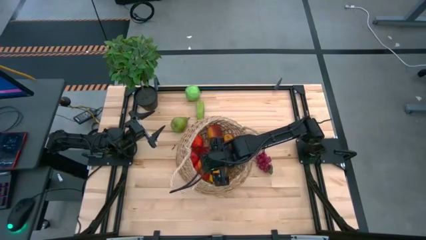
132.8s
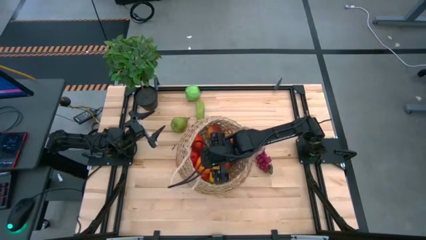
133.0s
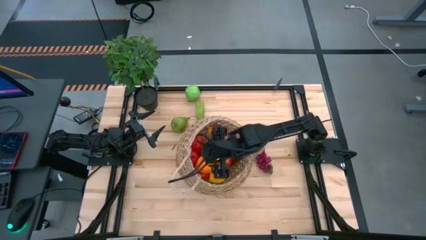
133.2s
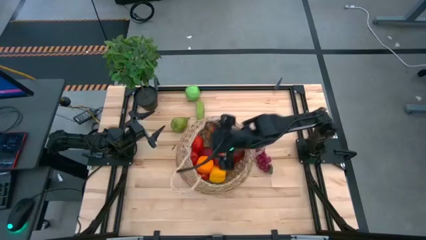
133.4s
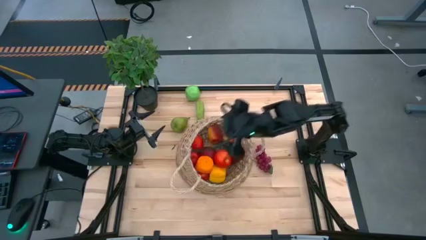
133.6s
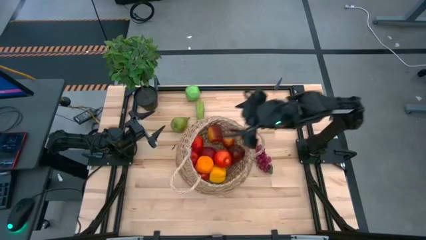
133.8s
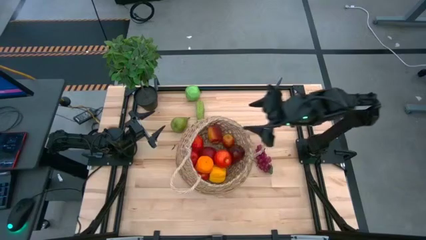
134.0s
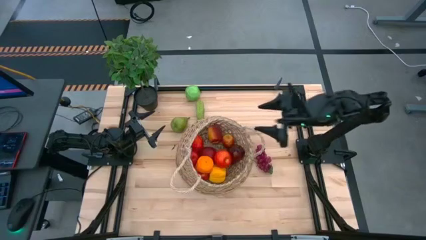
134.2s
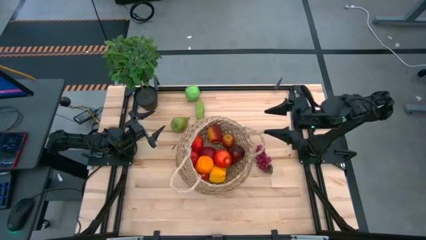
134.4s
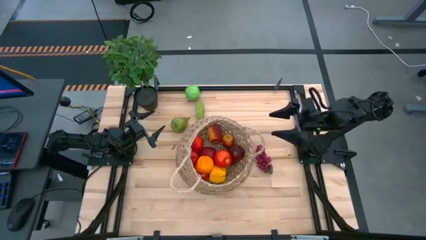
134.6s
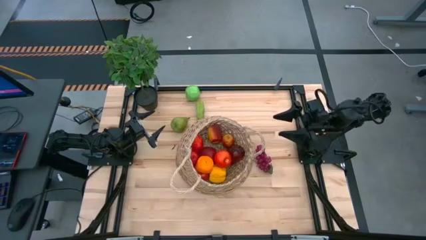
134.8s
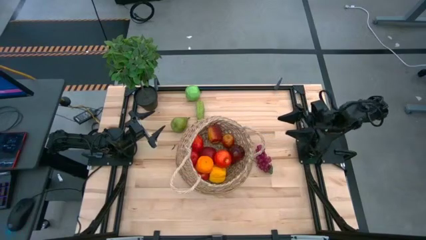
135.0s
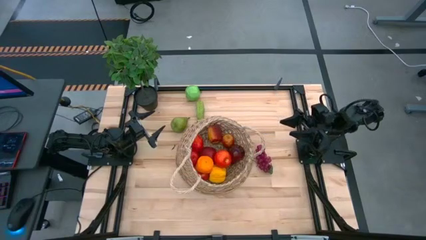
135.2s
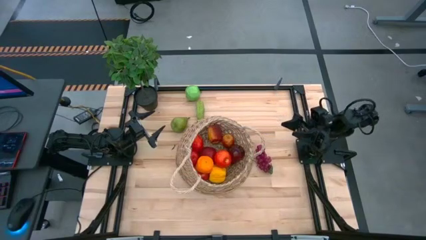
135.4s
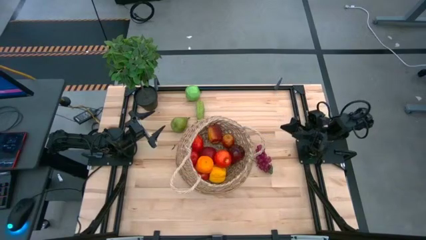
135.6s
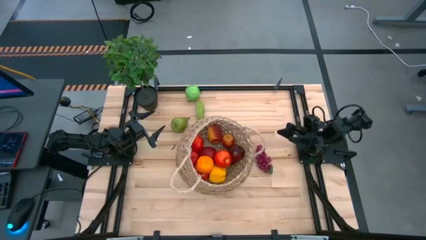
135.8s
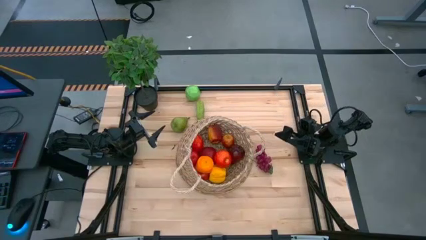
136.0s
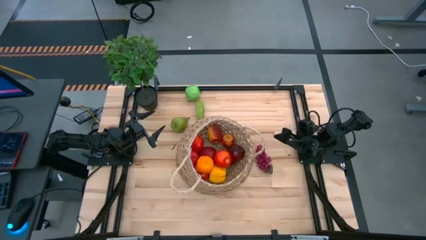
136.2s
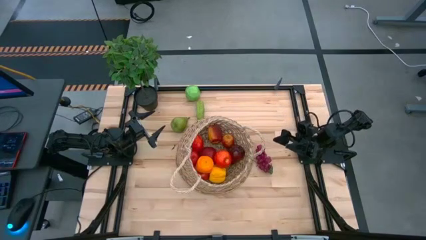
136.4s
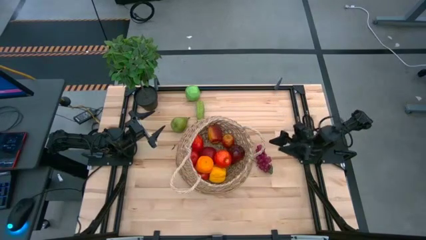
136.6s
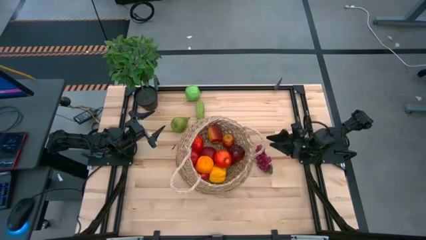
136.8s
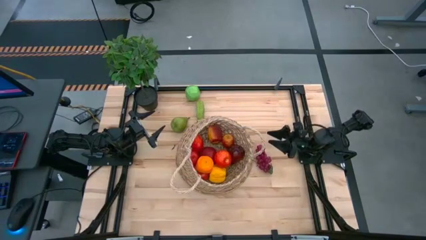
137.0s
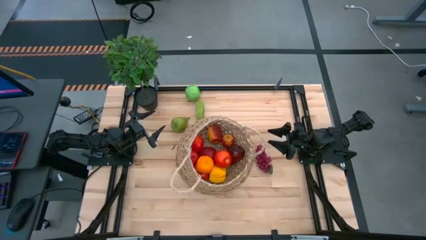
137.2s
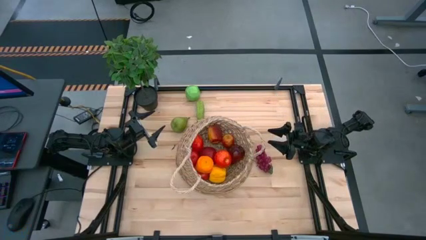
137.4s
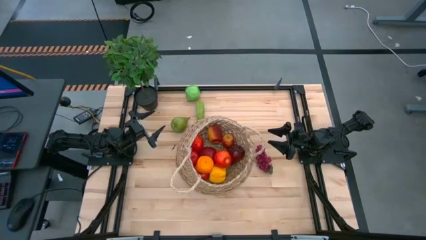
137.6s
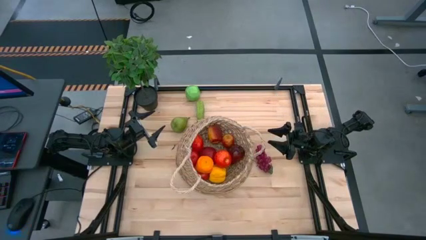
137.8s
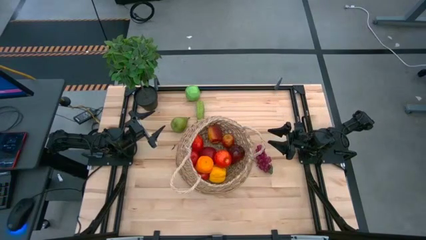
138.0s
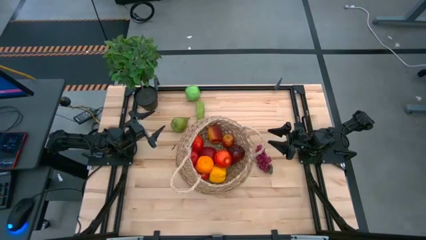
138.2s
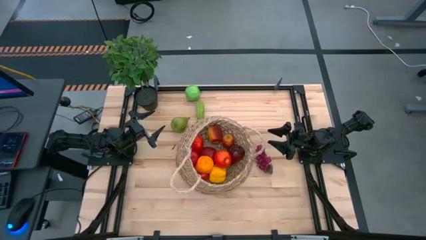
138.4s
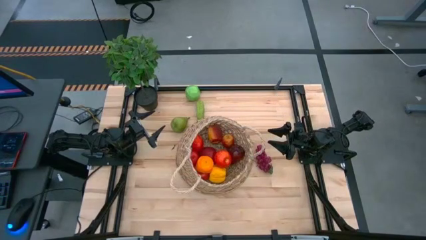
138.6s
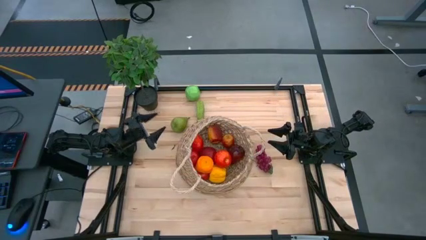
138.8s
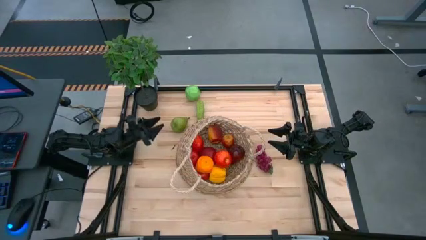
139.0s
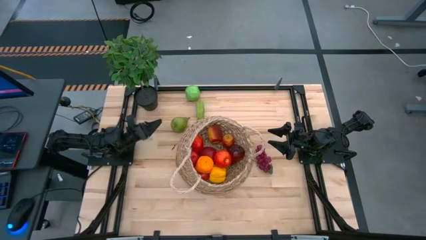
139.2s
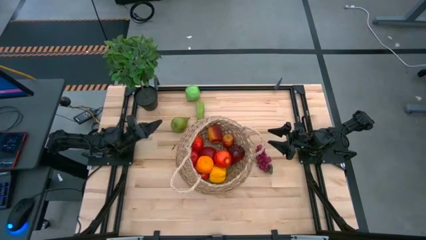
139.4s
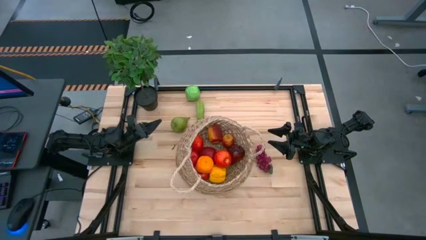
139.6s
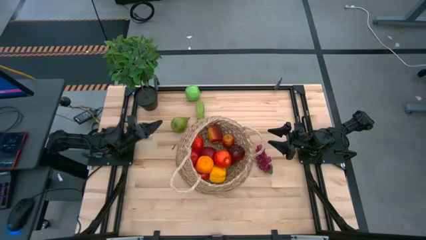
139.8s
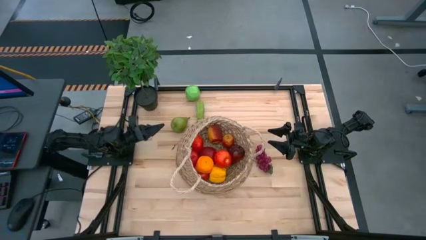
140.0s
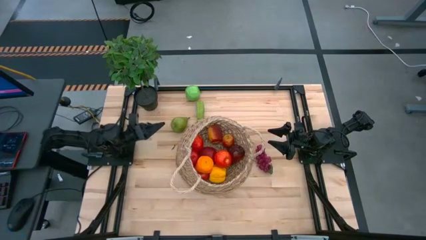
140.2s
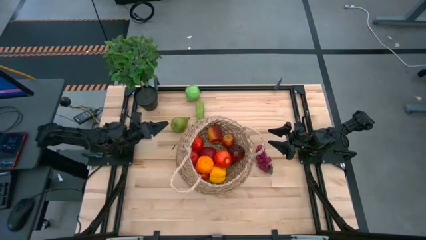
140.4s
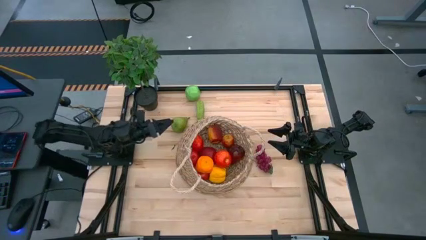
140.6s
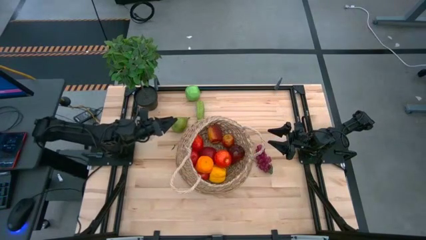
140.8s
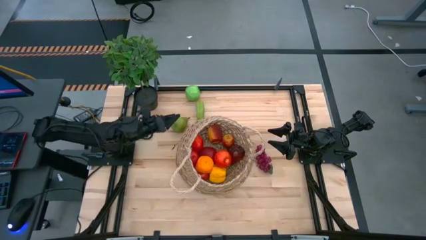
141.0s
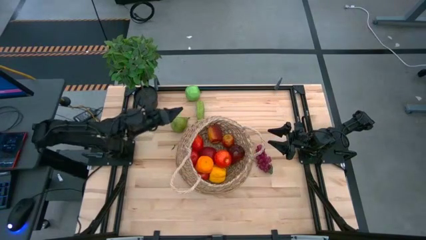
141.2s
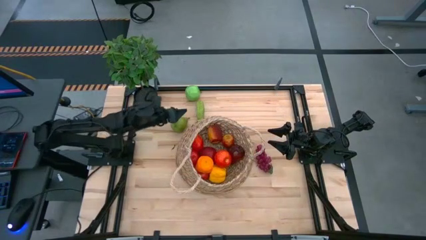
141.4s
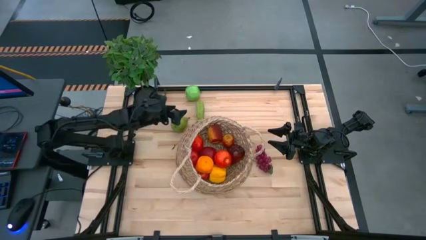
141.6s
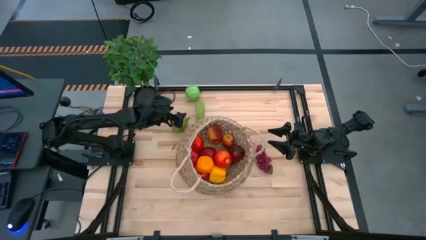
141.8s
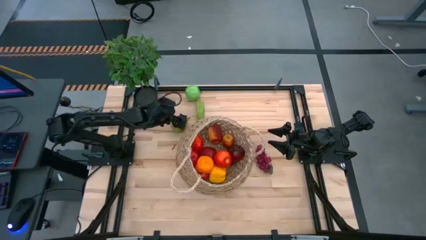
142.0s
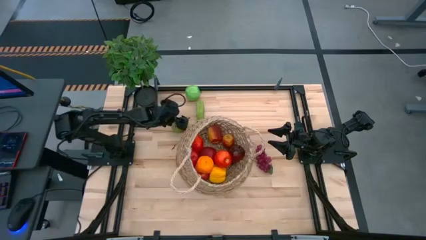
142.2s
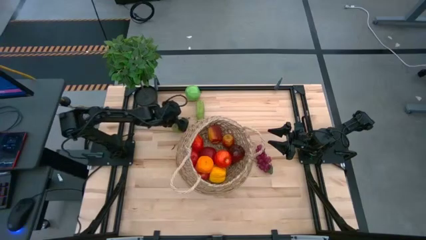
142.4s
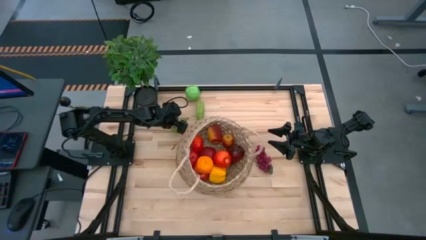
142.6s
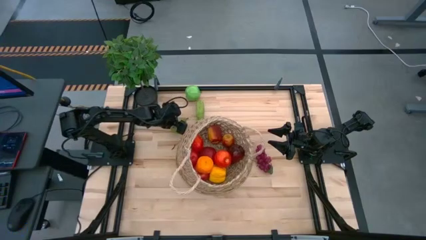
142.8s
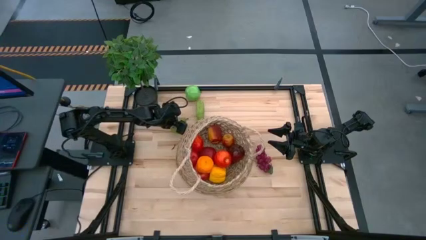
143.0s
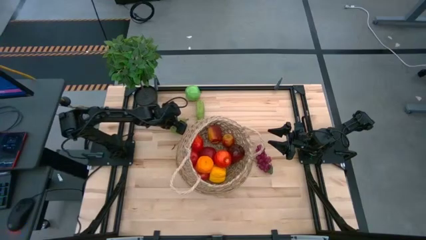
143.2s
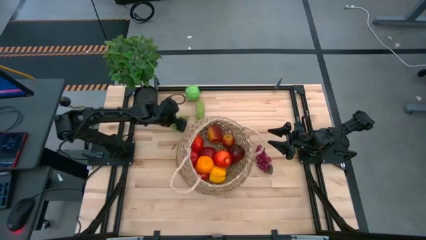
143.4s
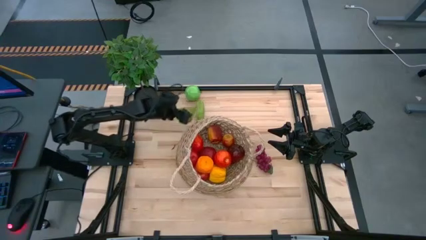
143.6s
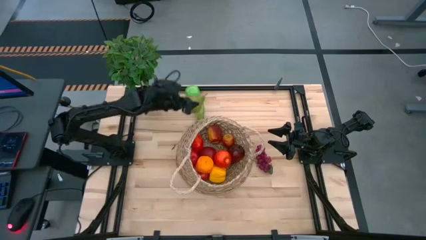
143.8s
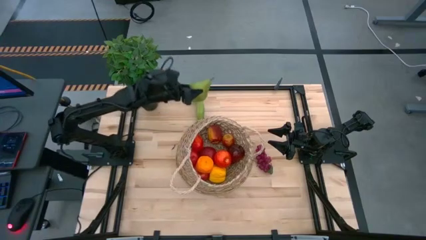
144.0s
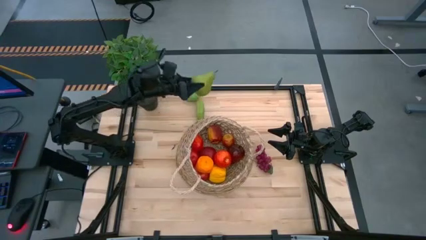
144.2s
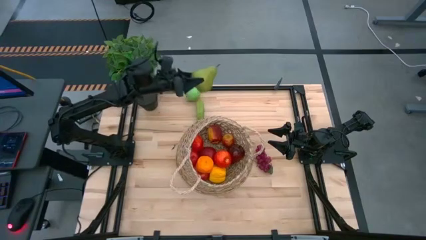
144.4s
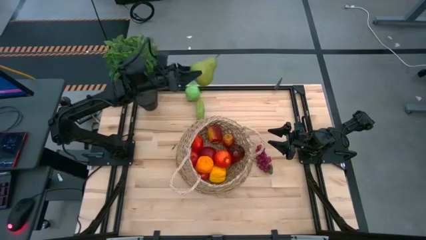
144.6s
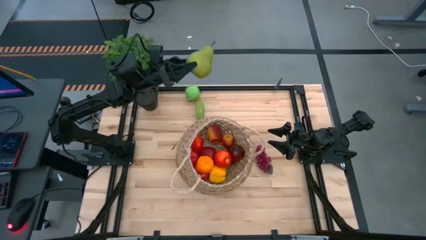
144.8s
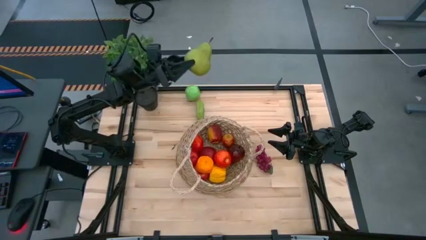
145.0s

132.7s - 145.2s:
Task: Build produce basket
Put the pear into the woven basket

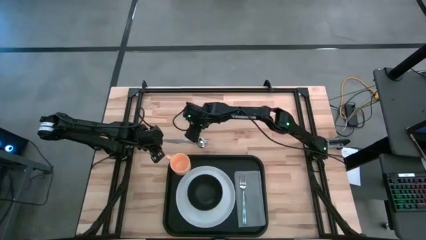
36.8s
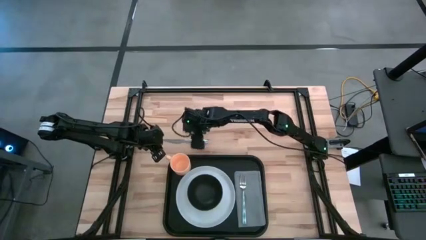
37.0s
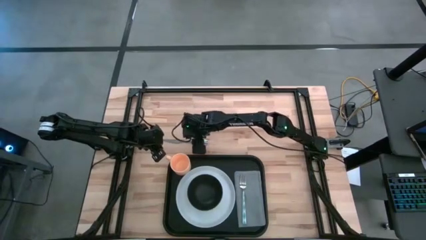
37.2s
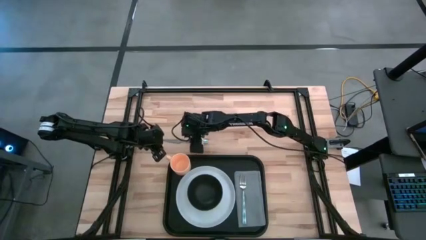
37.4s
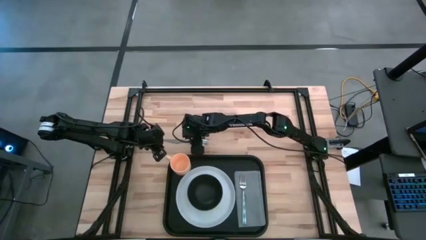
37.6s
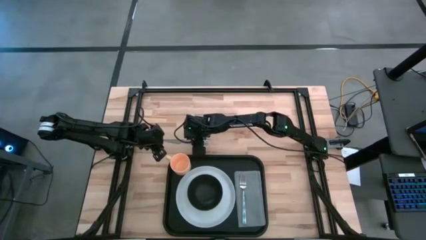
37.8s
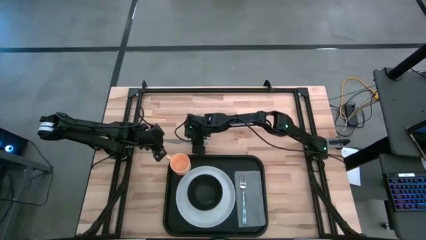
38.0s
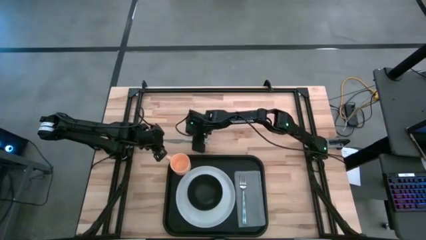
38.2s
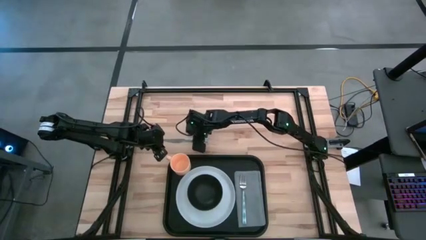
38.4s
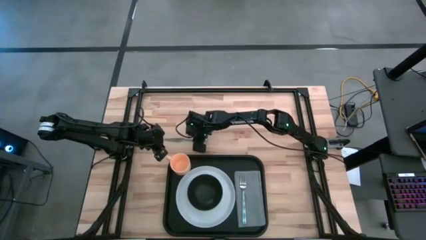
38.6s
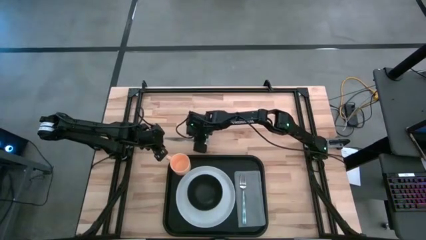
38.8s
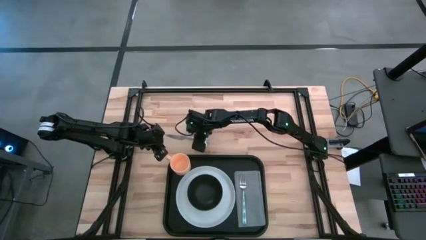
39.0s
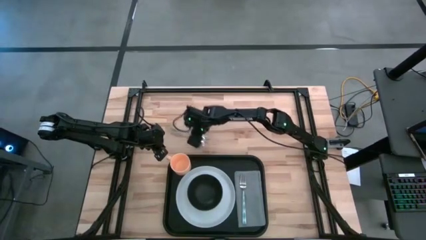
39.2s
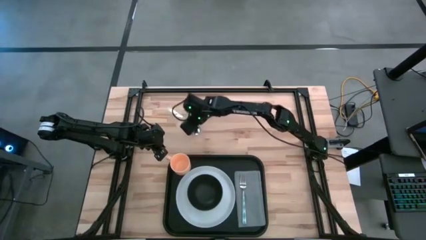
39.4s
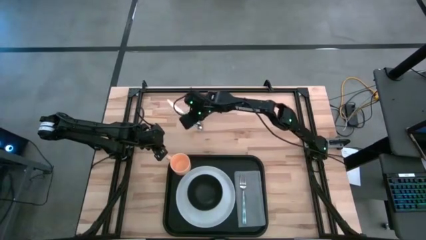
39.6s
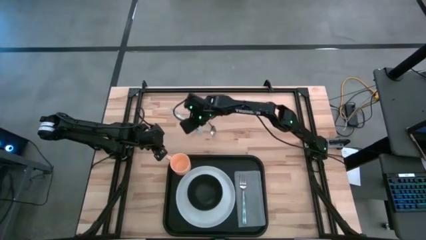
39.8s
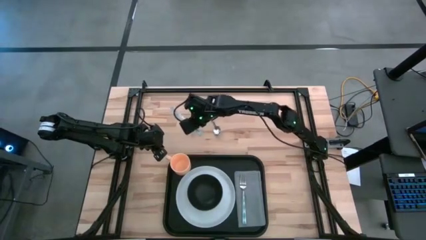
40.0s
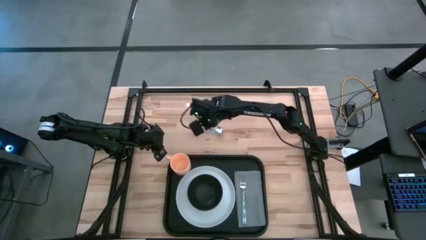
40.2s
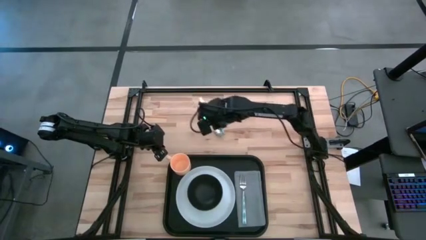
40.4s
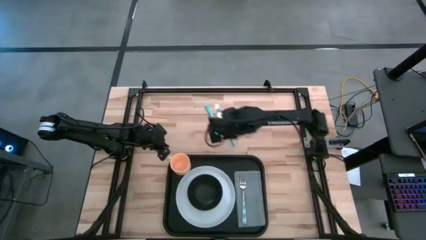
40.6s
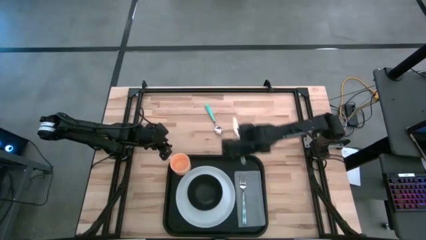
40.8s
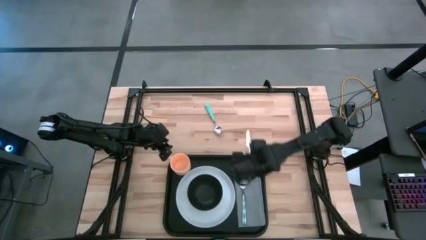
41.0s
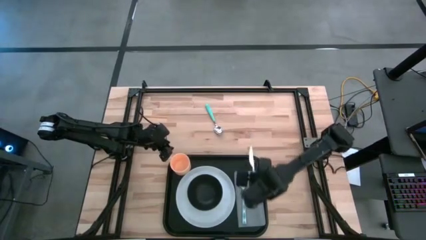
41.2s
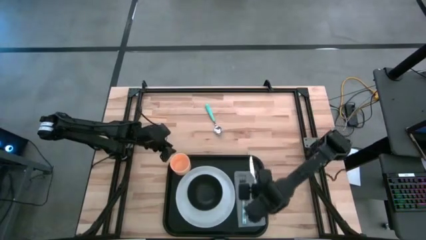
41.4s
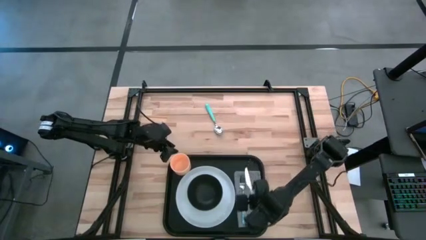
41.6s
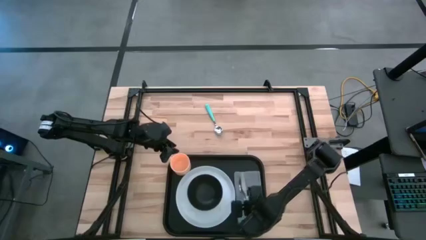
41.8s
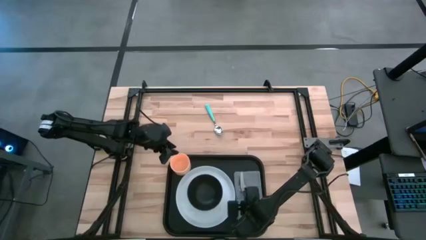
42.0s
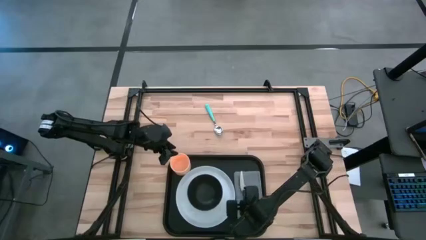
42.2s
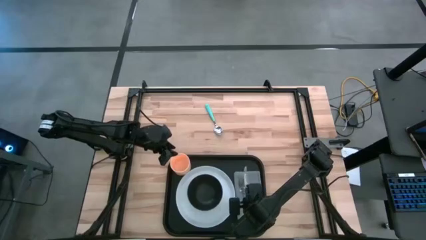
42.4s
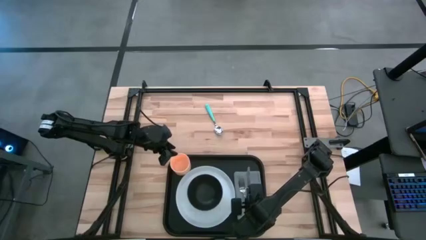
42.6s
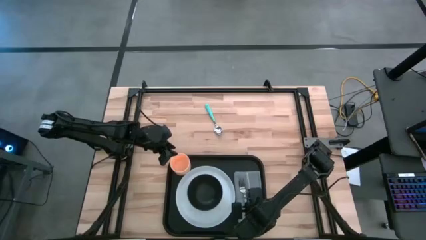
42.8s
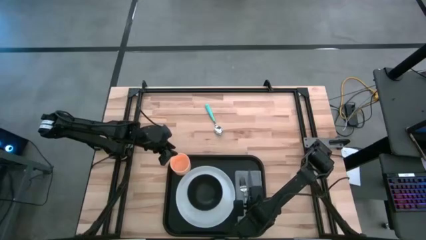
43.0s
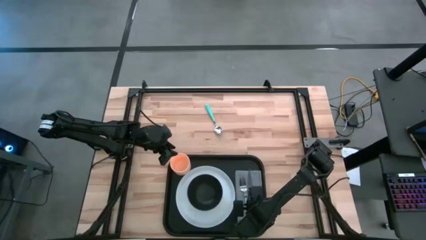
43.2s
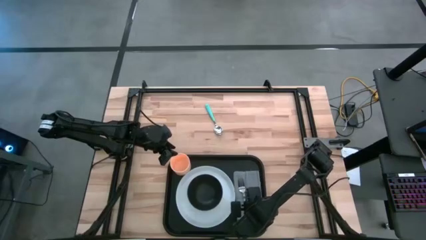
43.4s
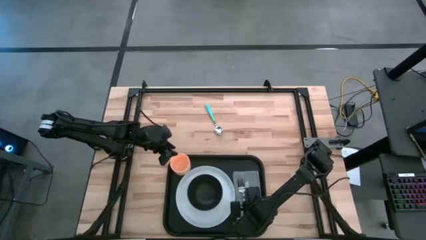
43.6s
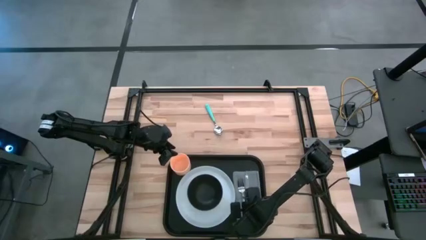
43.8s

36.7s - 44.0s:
Task: Set up tray
Put the green knife to the right of the green fork on the gray napkin on the black tray
